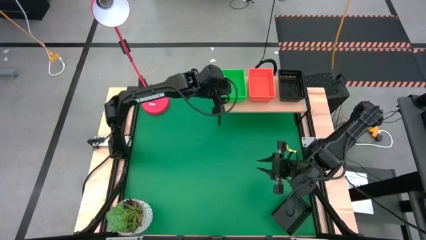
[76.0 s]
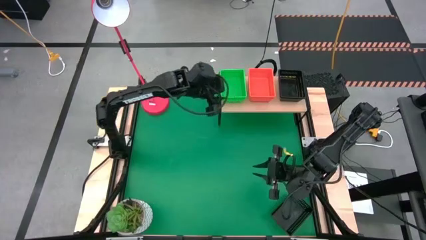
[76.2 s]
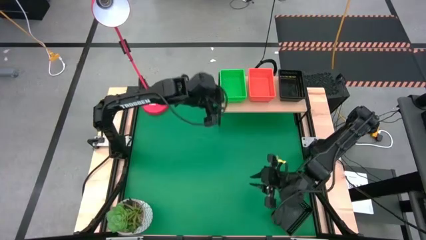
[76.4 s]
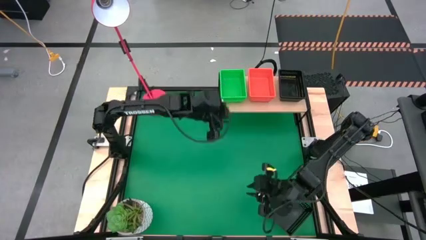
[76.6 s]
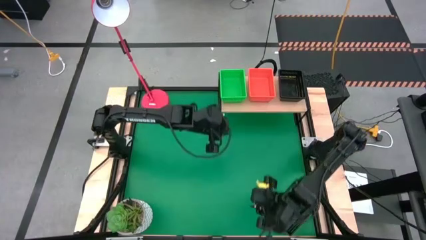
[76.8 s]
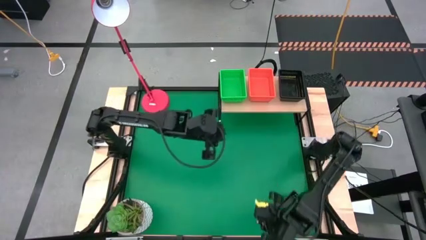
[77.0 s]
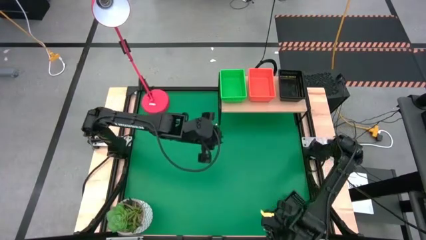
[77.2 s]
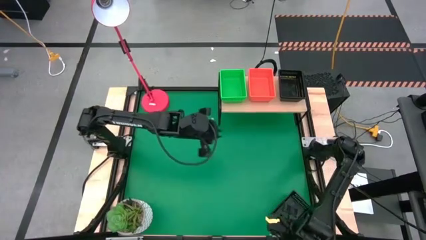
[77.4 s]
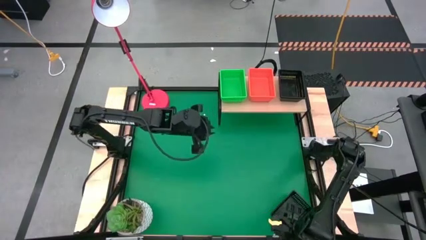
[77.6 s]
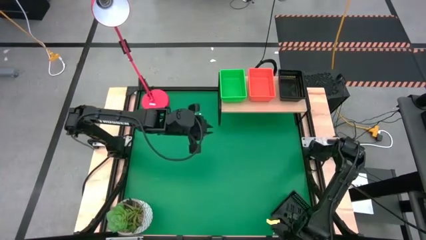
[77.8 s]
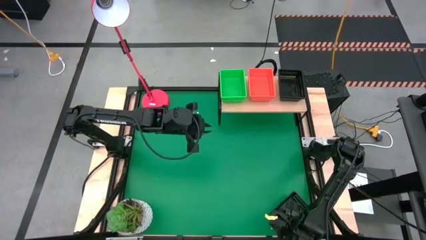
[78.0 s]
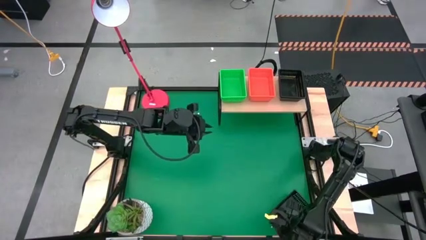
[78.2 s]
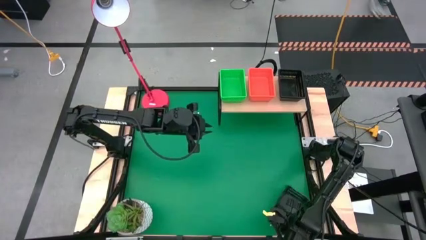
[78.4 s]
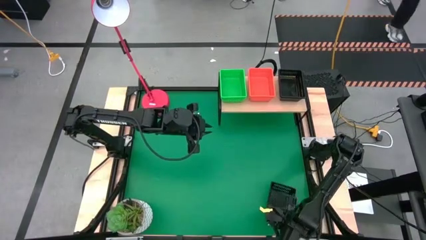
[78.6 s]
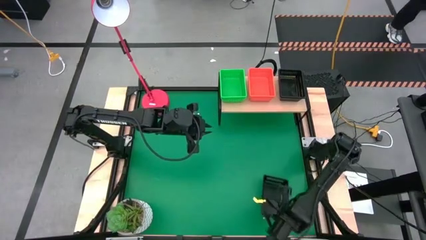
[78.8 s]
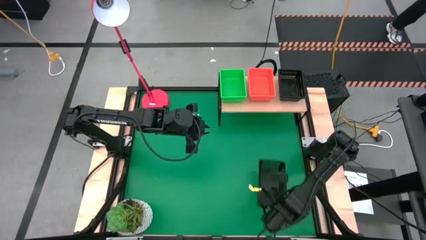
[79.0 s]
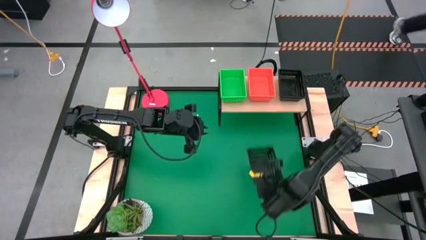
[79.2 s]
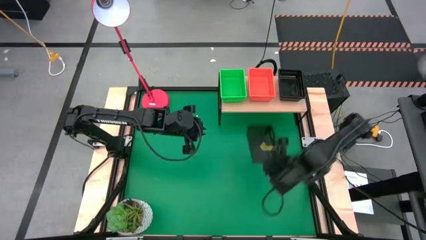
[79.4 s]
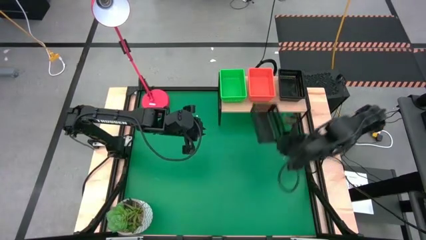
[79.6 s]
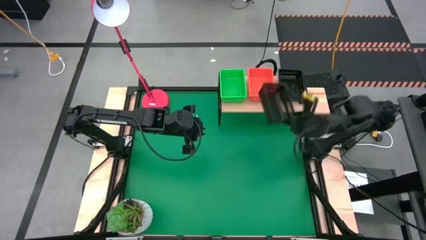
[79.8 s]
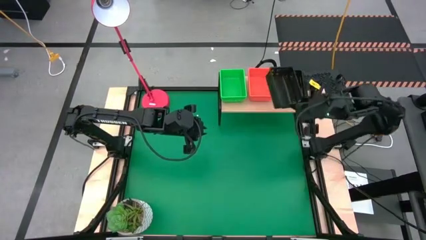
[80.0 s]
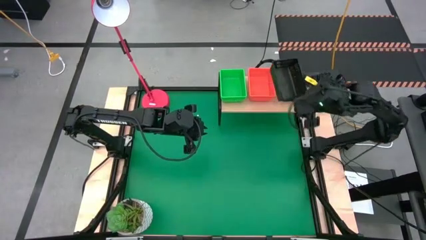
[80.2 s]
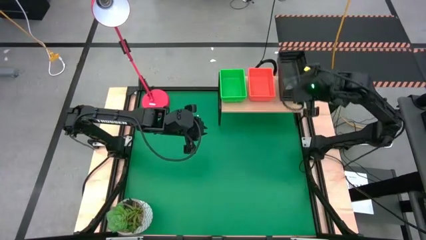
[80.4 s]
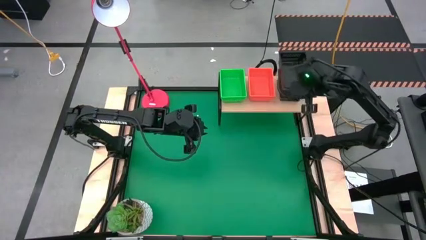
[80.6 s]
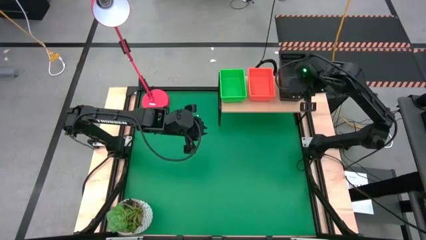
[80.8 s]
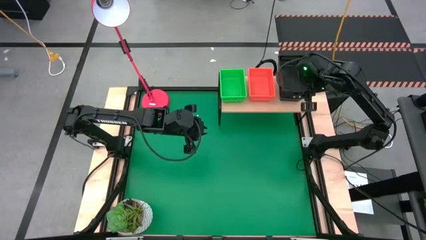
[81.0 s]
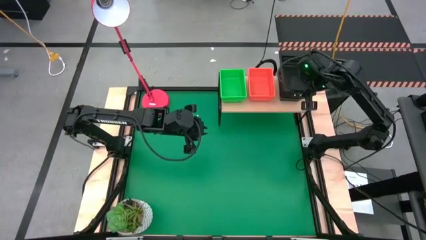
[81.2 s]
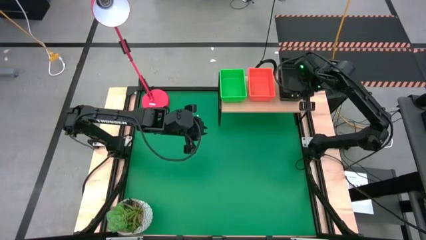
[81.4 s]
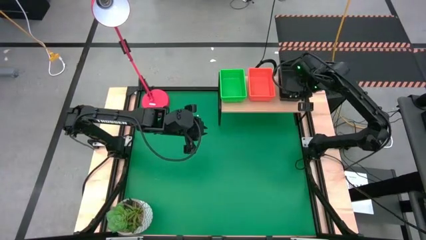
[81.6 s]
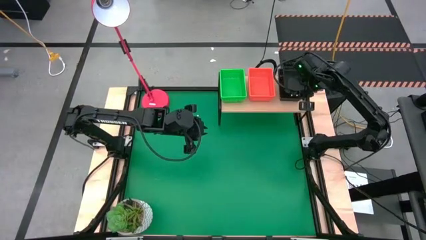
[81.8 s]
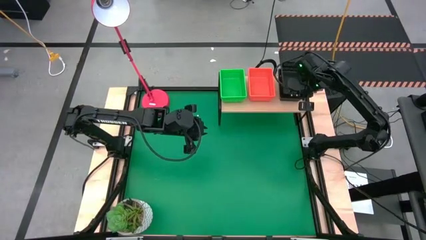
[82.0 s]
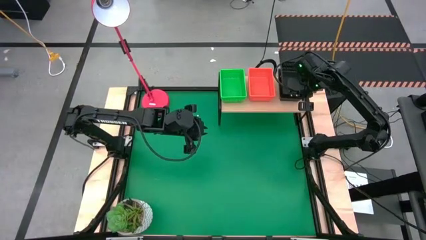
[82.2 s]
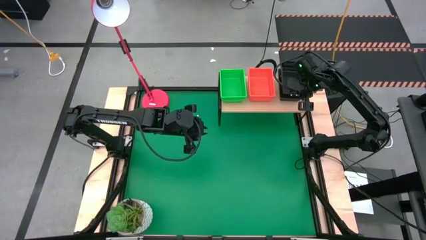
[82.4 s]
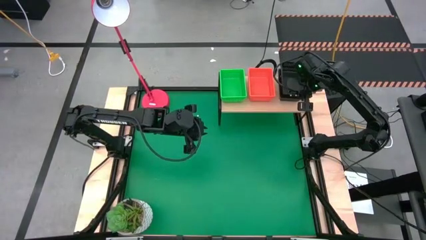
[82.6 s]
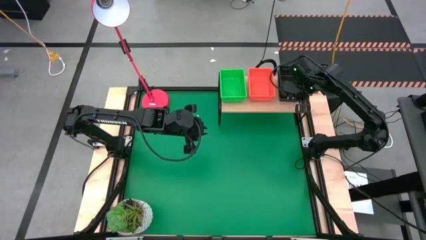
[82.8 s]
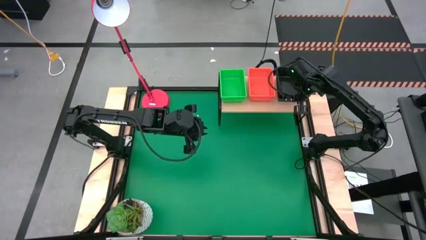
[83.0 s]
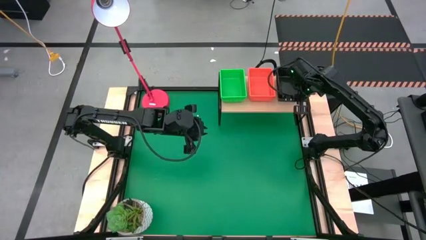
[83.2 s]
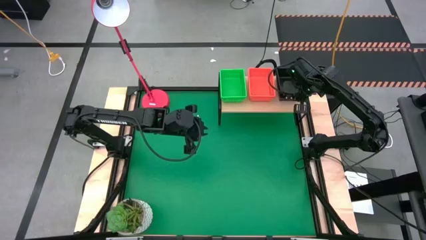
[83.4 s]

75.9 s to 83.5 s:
Task: Stack baskets on shelf by color
Stack the black basket on top of the black baskets on the shelf

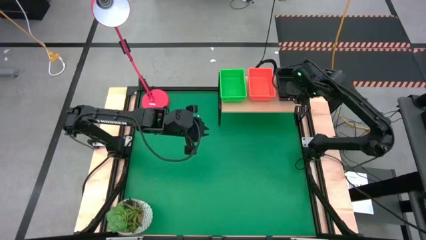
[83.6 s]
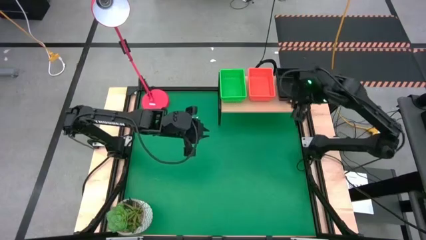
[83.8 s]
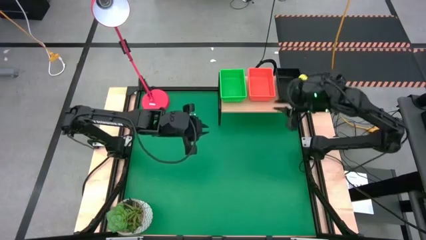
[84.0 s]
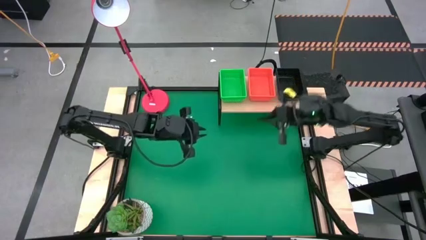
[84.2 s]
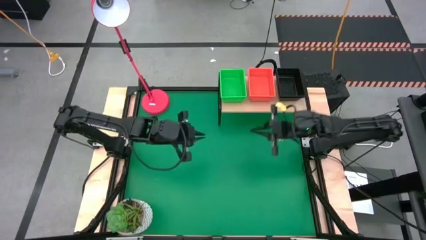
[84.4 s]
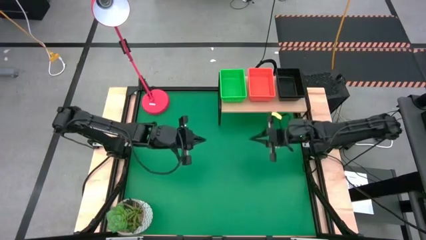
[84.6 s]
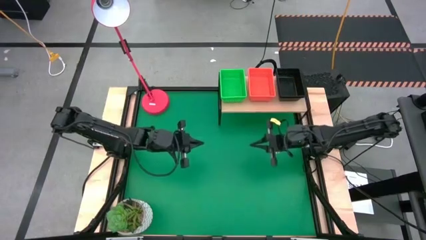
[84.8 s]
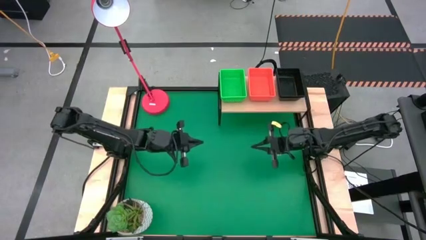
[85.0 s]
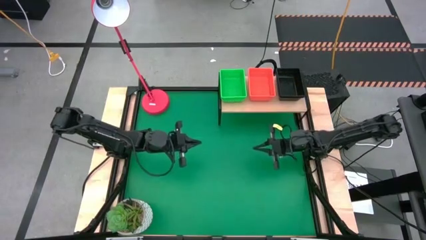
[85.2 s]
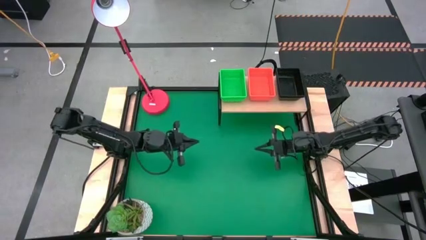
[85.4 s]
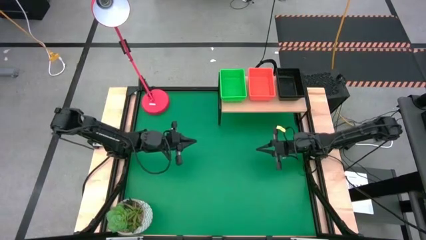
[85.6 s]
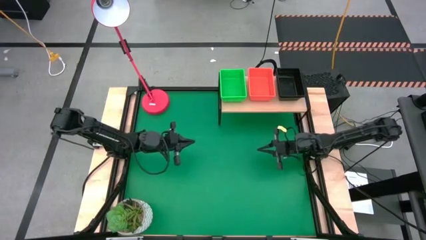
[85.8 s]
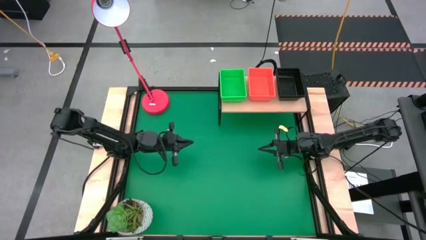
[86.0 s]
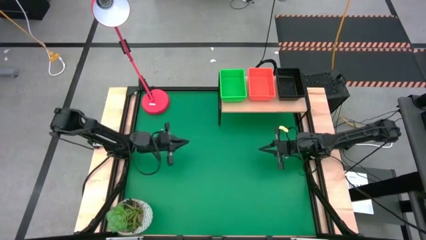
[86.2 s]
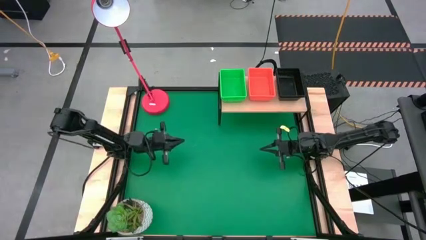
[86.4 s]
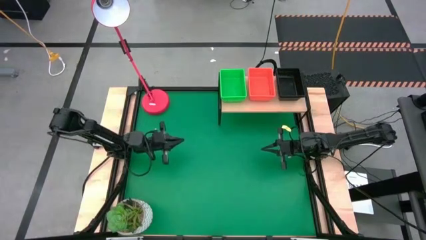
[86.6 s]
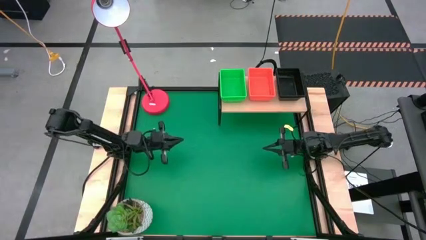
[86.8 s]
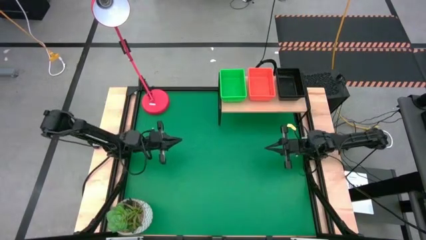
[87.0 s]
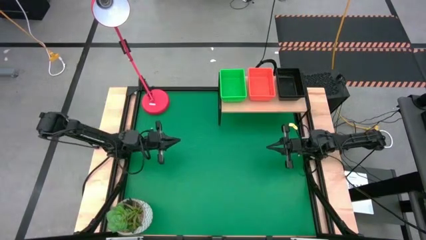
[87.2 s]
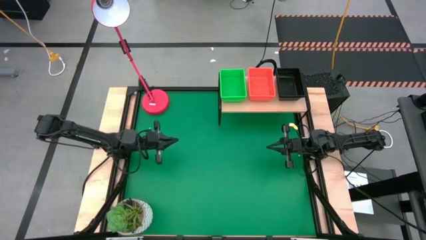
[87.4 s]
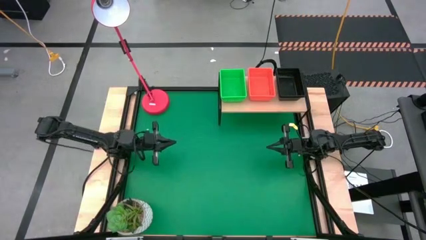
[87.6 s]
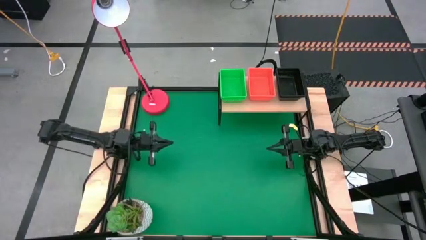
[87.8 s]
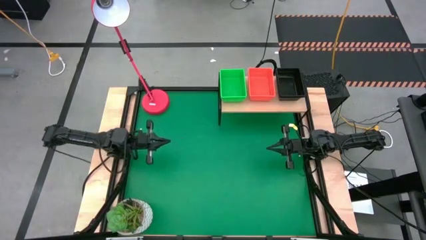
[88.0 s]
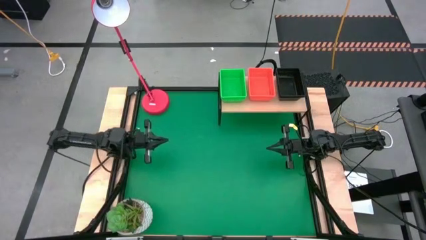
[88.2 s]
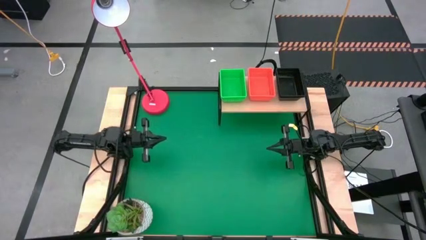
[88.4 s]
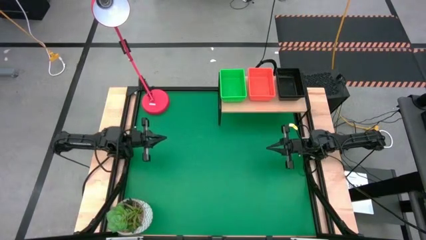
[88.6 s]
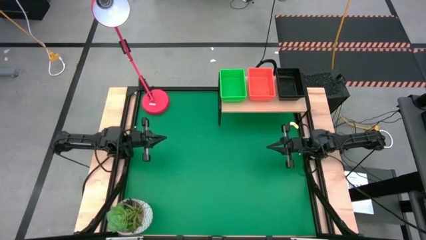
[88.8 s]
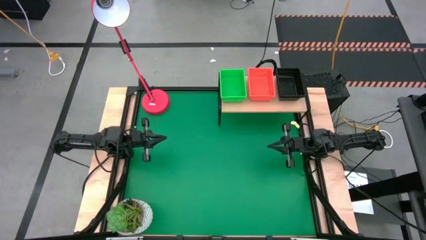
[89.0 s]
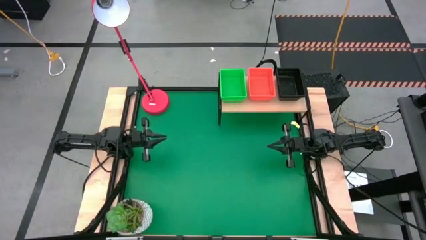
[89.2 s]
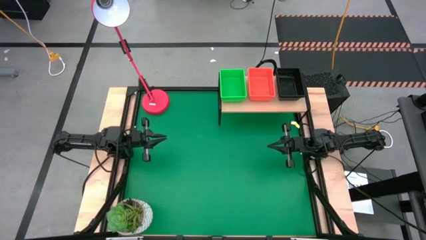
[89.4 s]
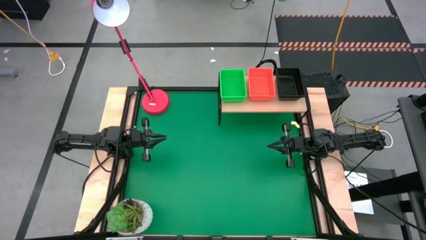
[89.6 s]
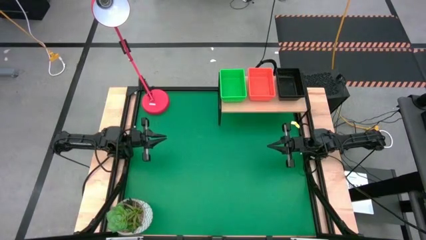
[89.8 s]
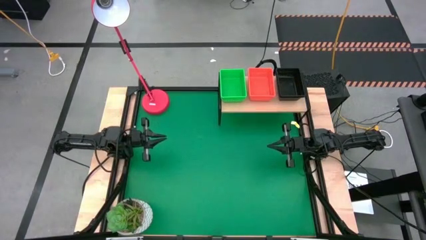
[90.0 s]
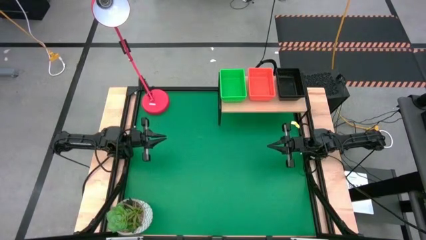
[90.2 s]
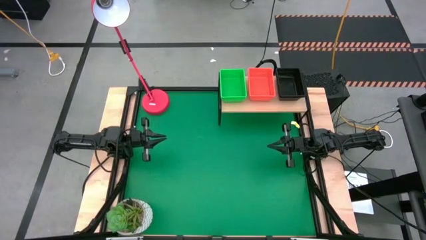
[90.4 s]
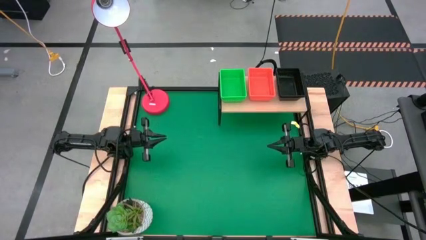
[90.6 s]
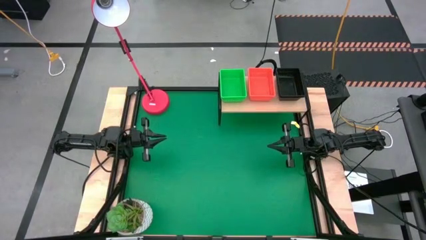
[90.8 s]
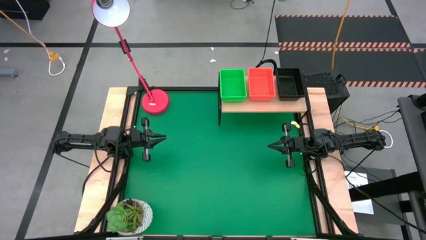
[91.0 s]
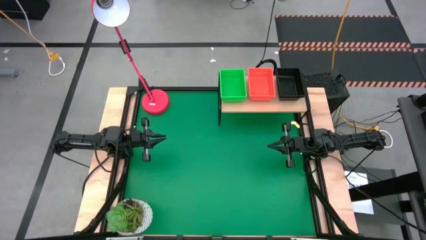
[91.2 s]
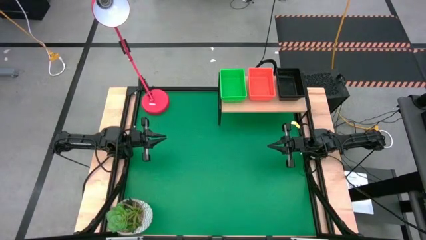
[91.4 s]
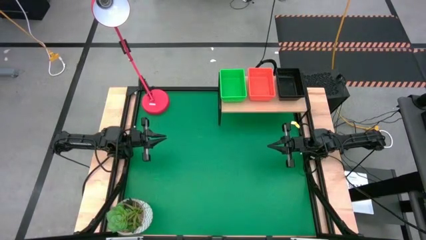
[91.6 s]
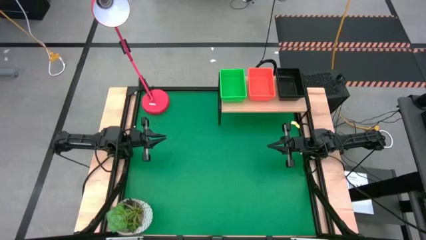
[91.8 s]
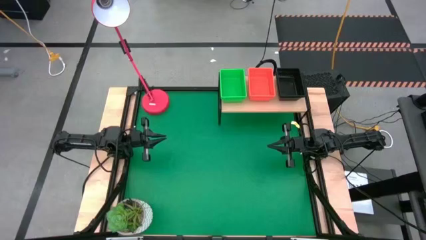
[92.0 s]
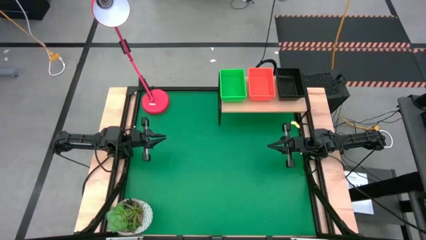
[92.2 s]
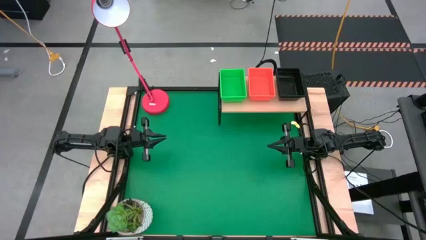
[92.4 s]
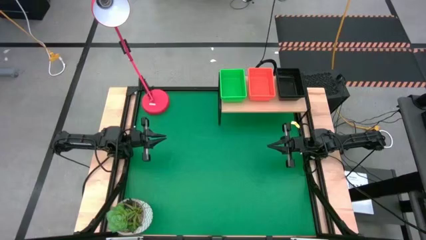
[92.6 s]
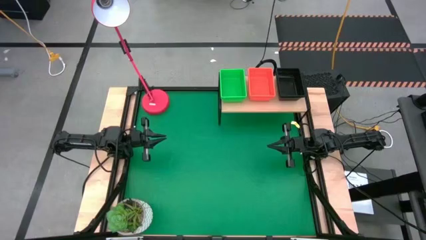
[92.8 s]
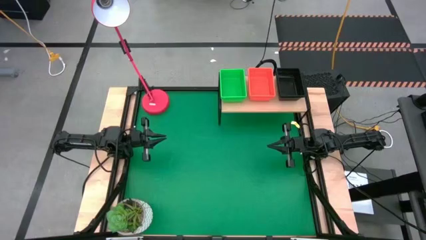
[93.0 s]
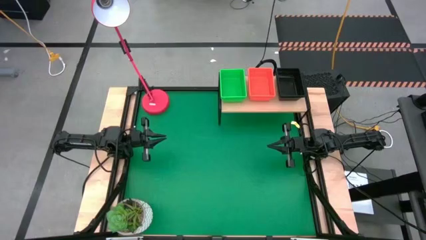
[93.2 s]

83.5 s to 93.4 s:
Return to Home Position
